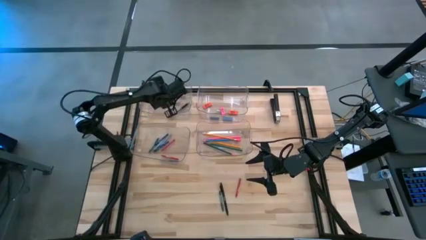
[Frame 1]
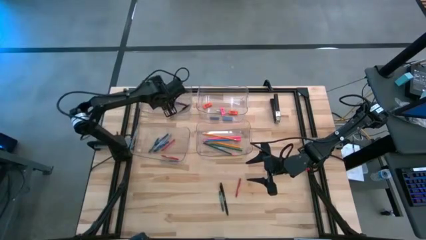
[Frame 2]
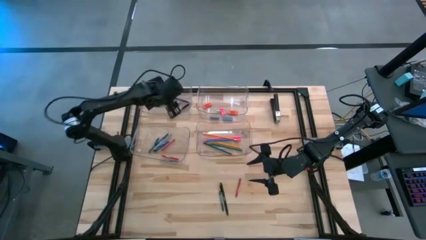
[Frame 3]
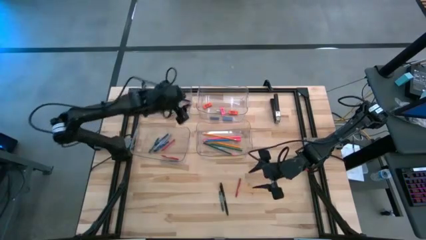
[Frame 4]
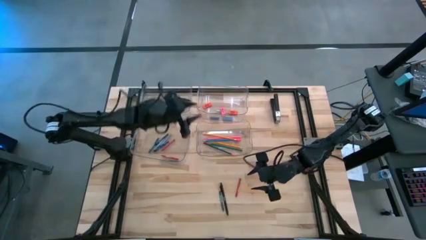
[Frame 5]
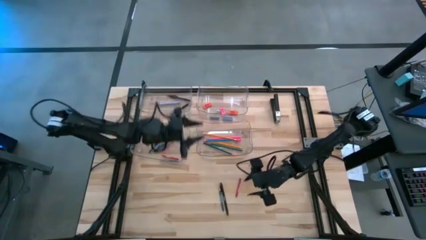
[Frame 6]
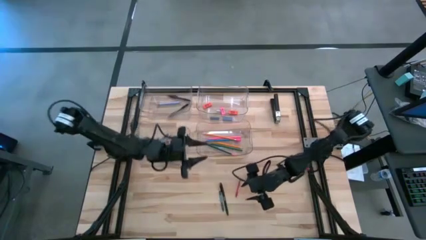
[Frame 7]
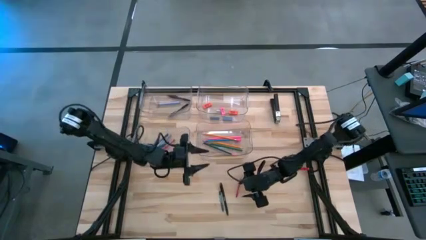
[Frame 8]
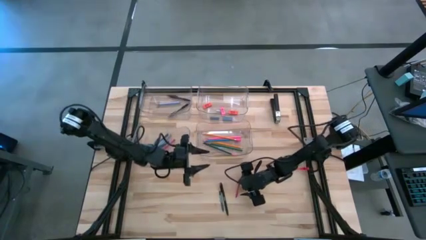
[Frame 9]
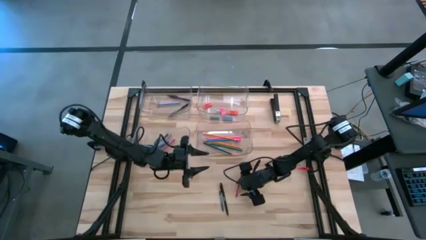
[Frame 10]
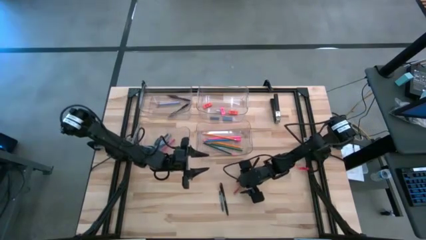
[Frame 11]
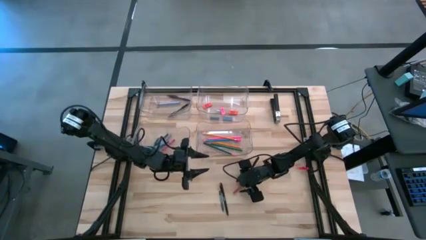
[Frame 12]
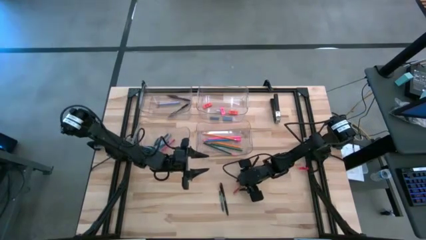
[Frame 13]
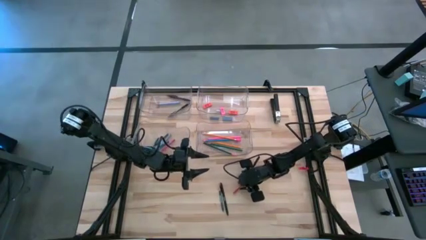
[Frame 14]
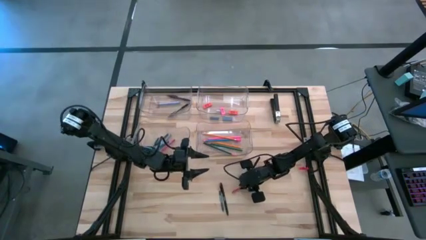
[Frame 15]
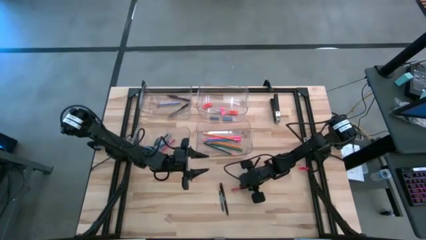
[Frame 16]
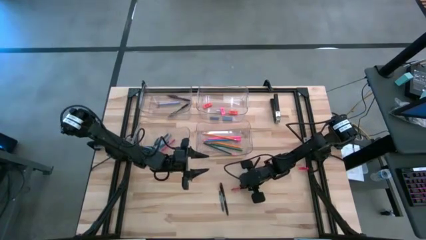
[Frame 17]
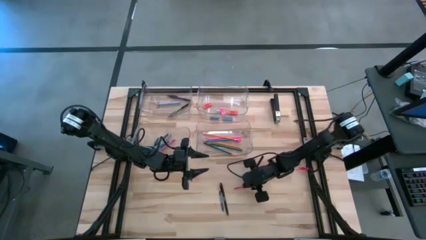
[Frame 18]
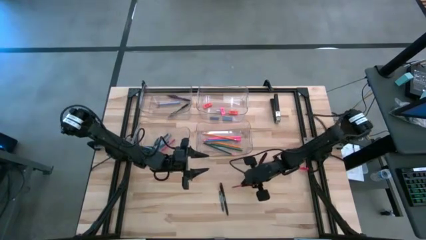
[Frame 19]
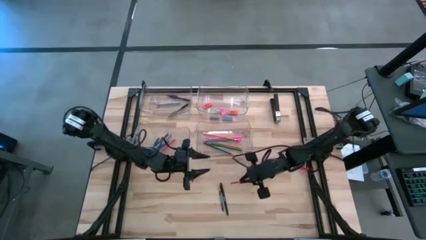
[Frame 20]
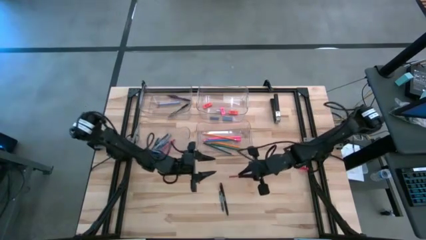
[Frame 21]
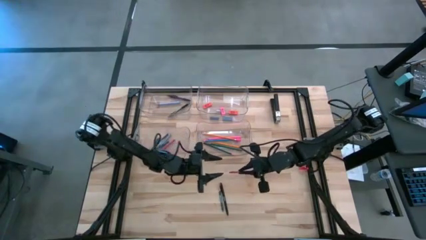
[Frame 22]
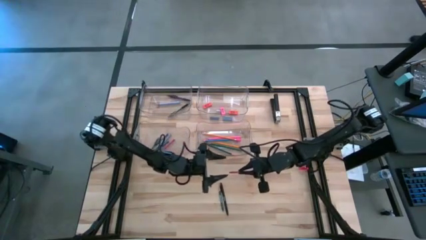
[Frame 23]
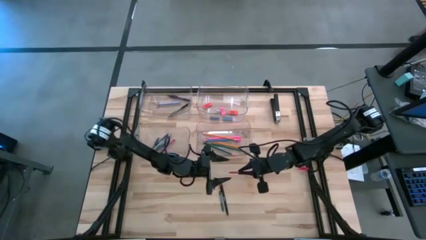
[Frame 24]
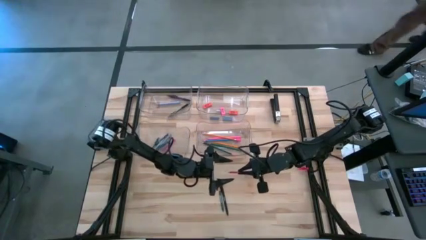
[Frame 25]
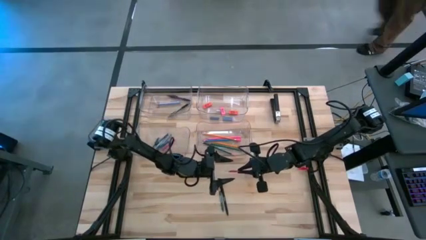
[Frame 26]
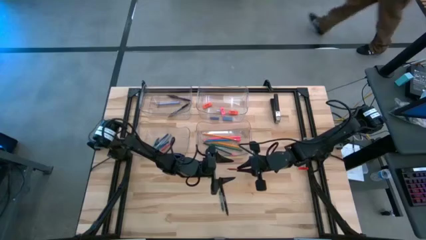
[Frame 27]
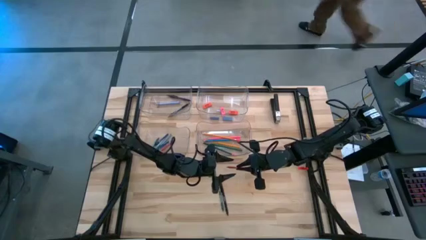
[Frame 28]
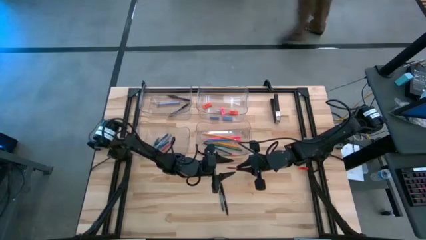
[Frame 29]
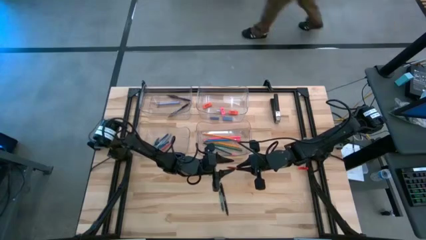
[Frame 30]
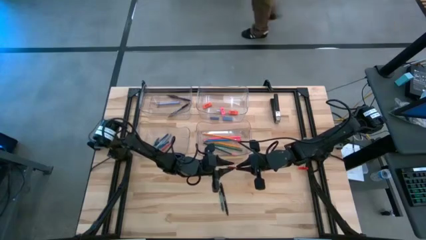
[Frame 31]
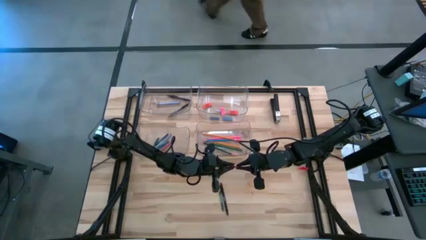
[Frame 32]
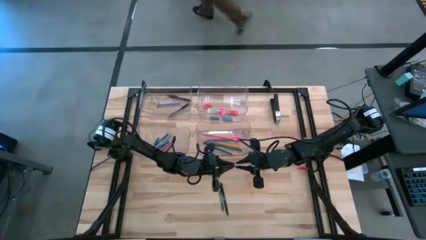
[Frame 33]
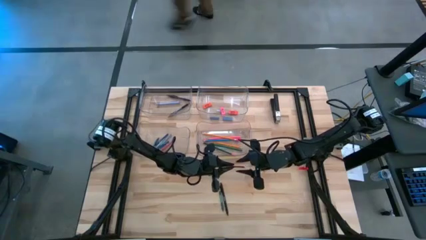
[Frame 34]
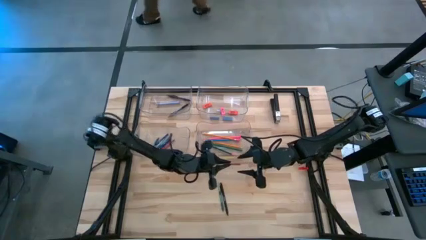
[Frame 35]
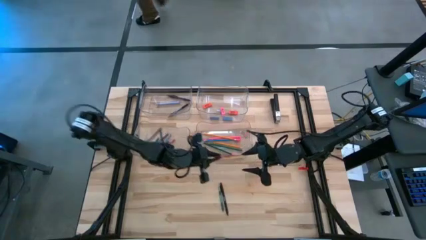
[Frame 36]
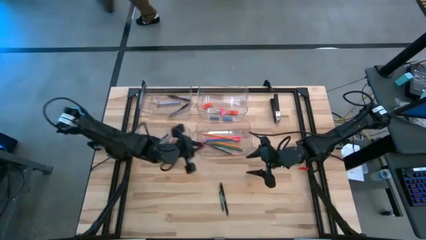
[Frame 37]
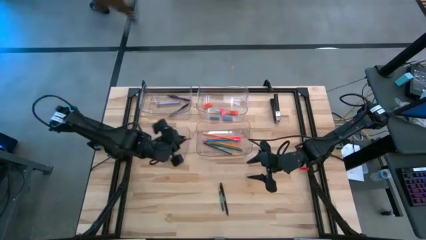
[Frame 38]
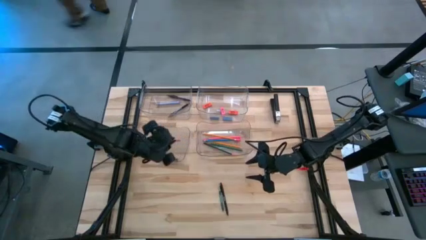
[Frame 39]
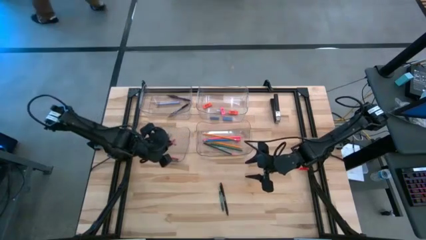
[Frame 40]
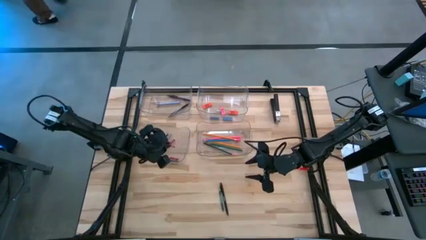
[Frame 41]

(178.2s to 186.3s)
Task: Sort crayons/erasers/pens/pencils in bins
Put the red crayon into the bottom left transparent bin

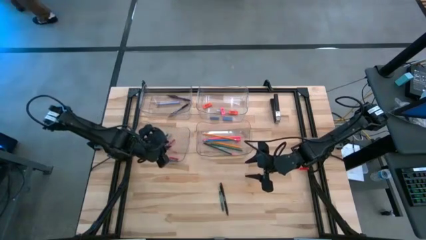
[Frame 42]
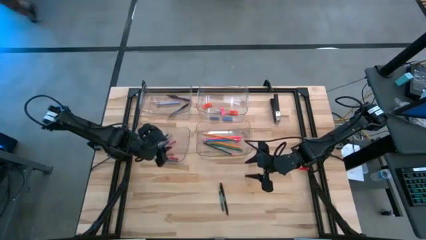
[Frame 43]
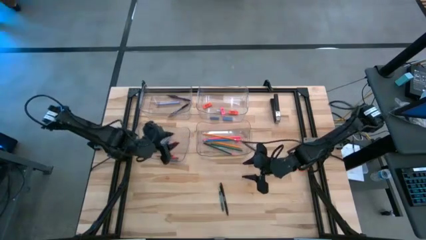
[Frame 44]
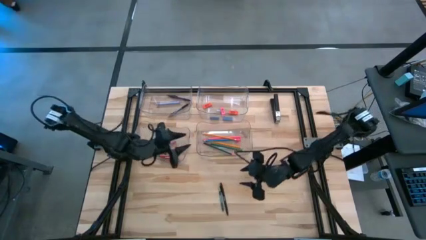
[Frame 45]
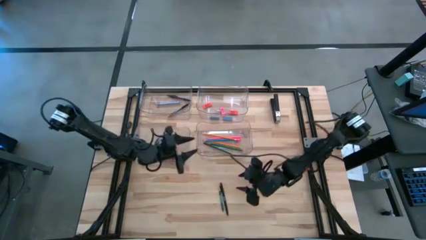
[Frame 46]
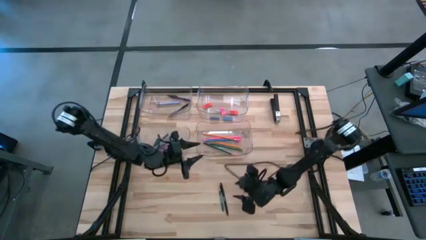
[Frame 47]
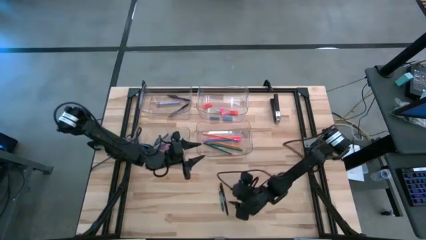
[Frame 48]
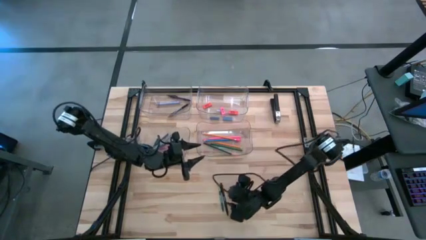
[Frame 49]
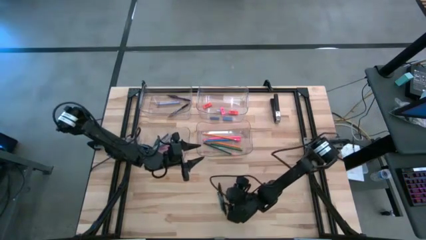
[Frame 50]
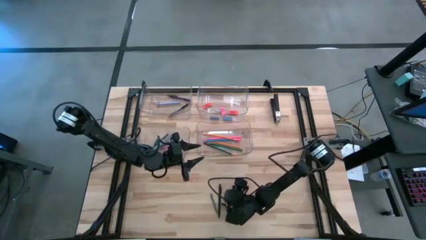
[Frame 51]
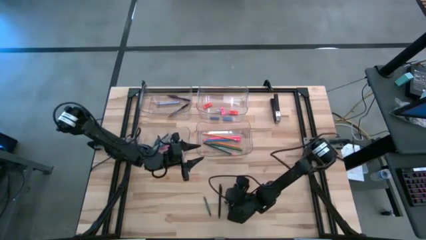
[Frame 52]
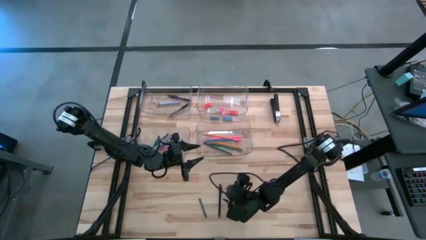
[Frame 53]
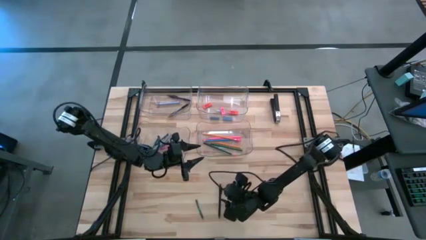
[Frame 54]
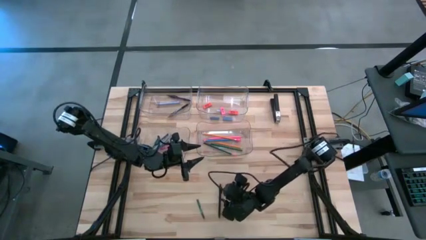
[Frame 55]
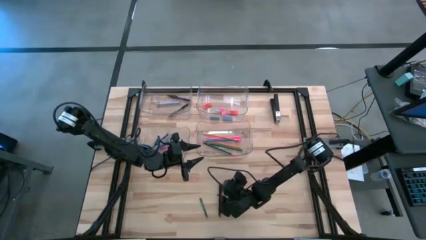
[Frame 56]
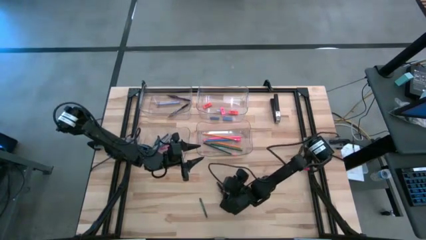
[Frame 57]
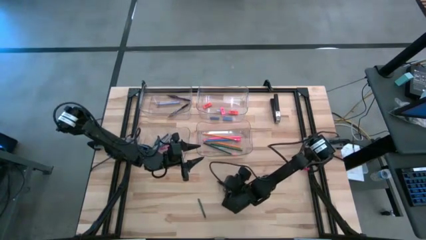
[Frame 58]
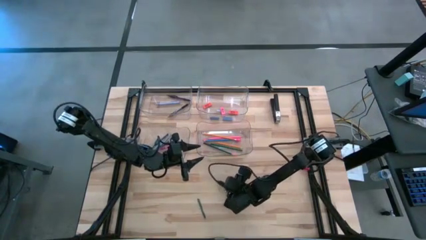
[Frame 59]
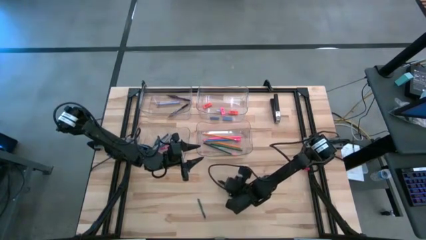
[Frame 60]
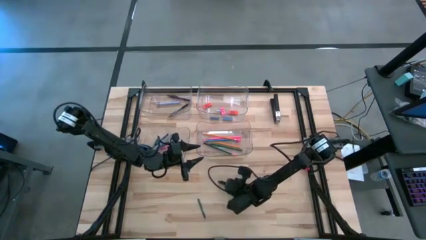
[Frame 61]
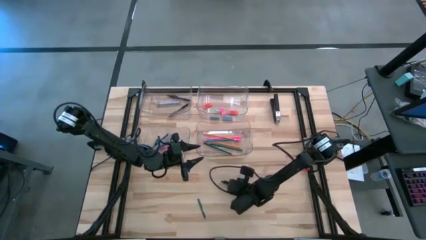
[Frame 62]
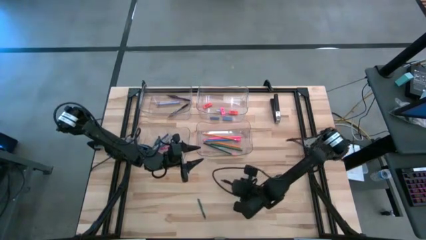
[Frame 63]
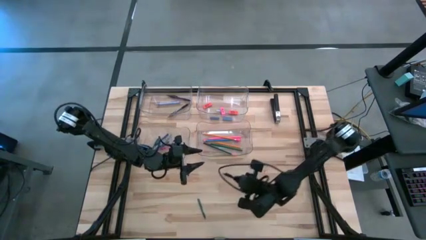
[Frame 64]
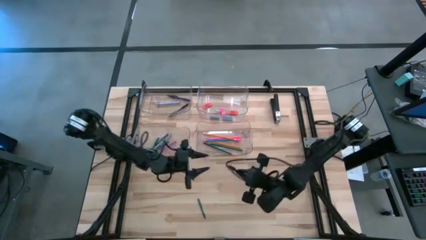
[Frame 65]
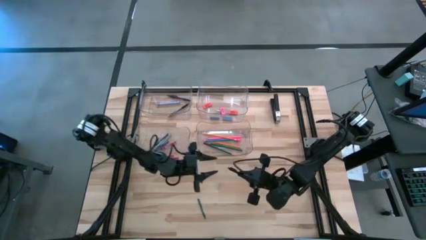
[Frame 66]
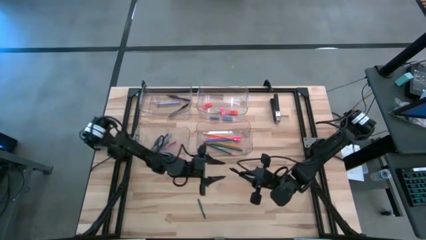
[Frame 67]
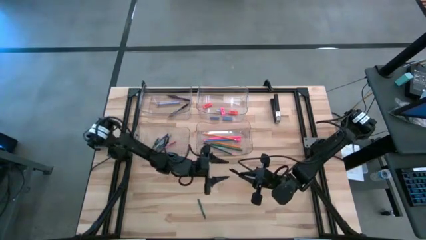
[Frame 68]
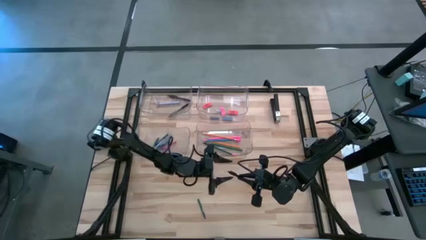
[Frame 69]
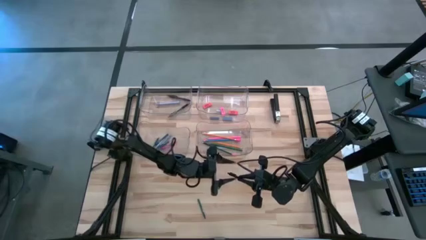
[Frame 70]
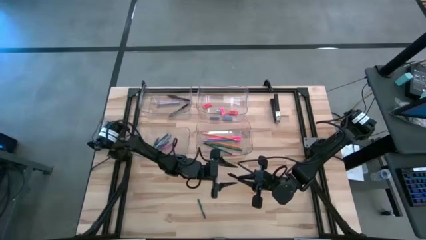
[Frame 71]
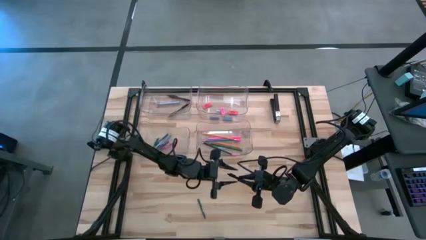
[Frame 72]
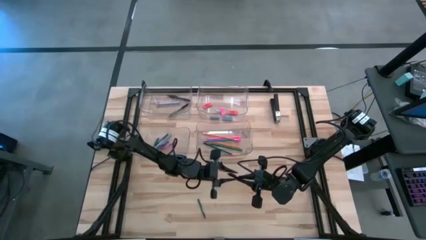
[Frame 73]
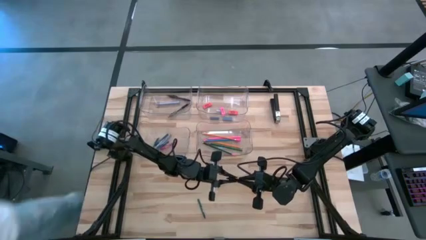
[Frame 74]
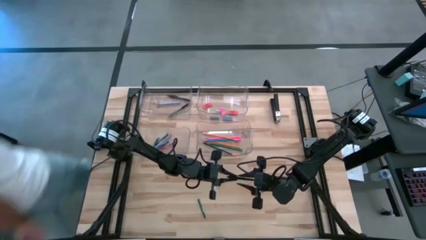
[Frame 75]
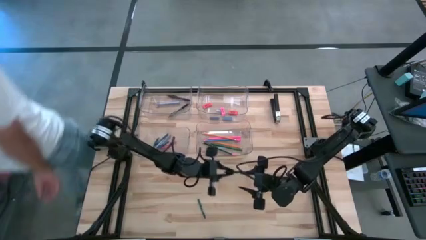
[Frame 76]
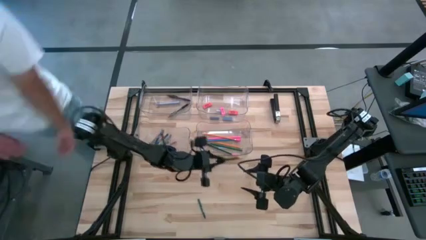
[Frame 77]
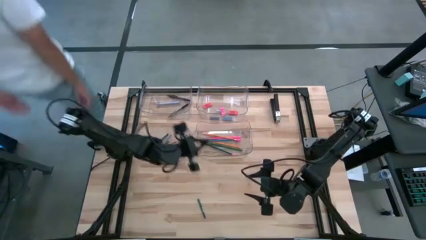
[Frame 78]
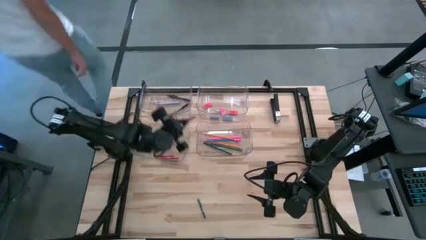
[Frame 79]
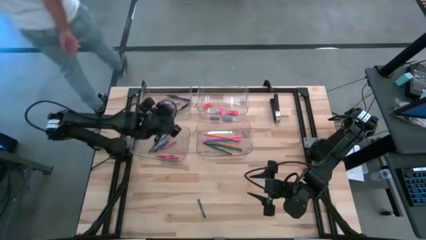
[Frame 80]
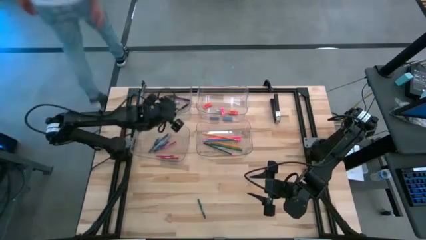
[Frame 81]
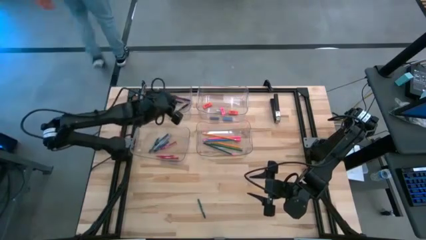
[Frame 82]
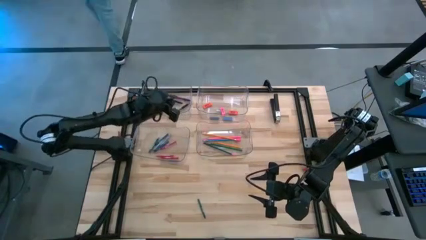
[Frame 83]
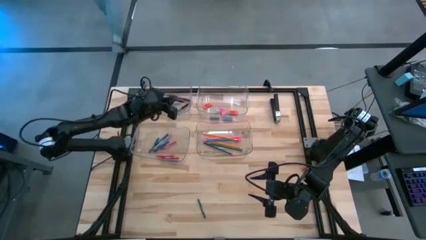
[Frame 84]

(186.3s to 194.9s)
Put the black ball pen into the top left transparent bin
